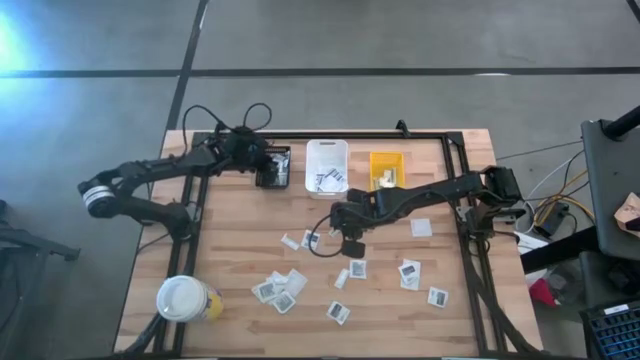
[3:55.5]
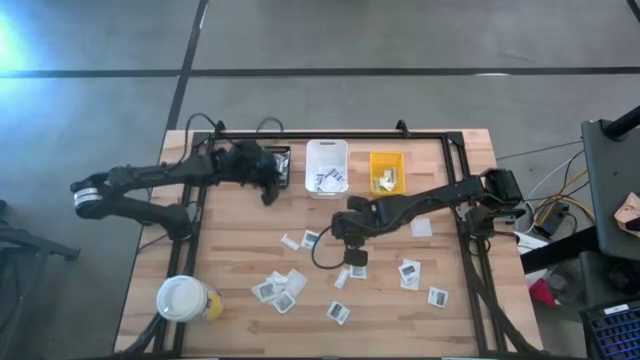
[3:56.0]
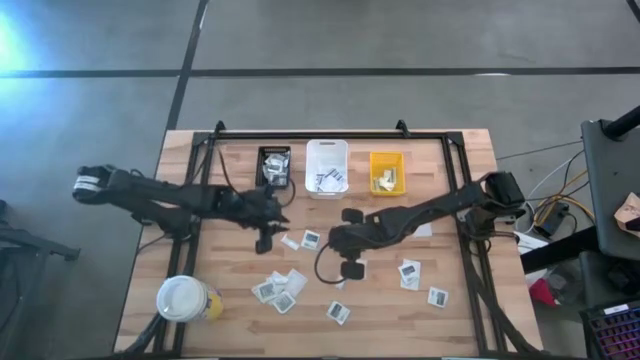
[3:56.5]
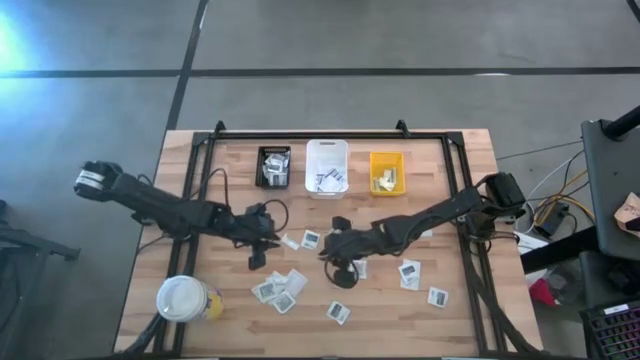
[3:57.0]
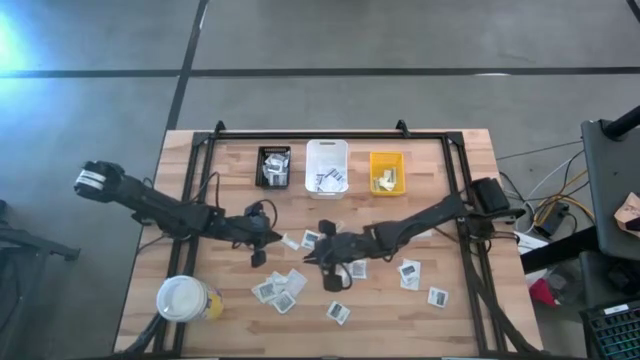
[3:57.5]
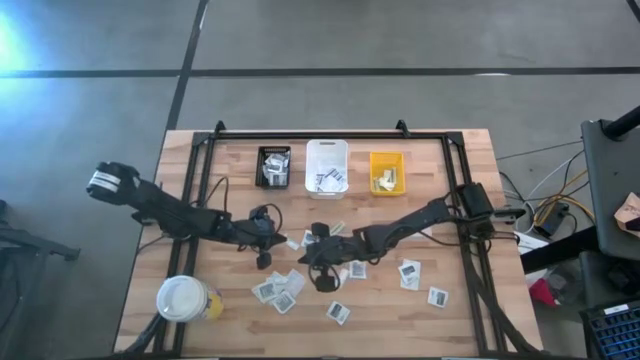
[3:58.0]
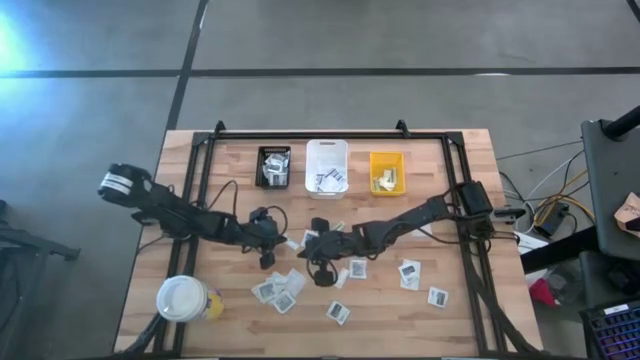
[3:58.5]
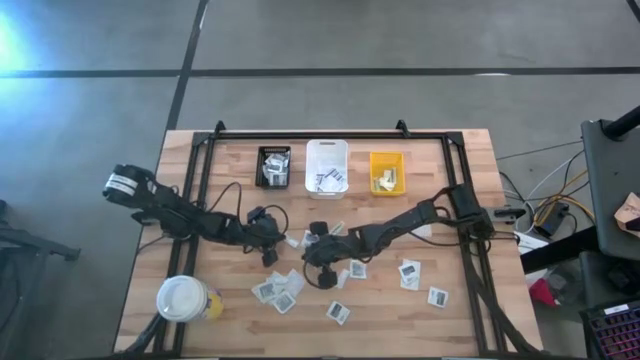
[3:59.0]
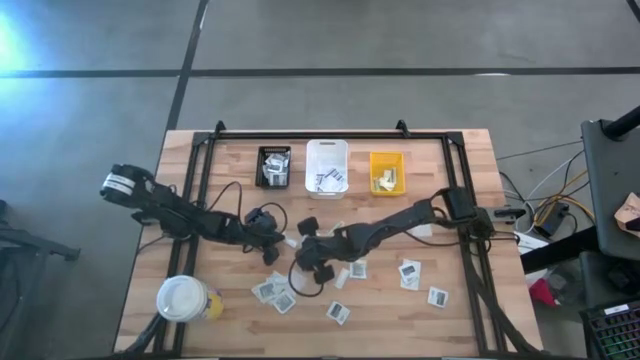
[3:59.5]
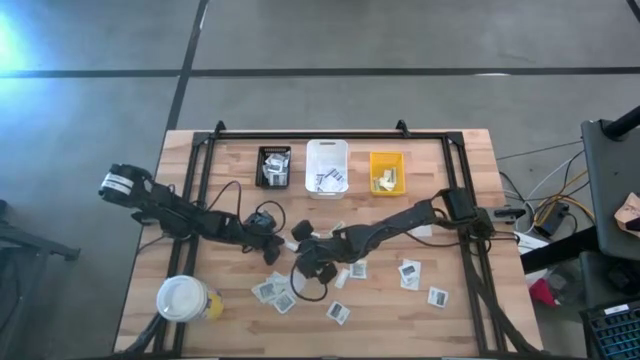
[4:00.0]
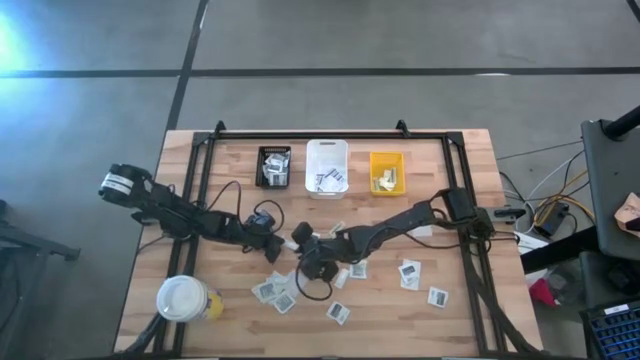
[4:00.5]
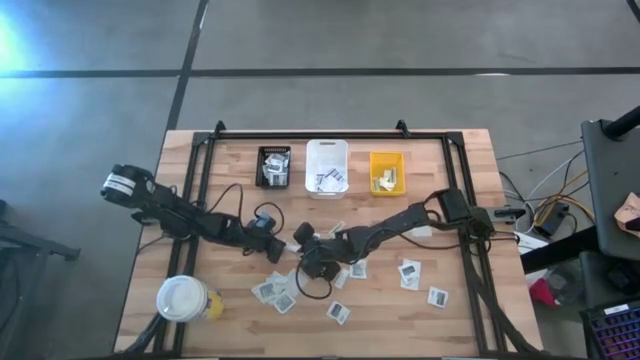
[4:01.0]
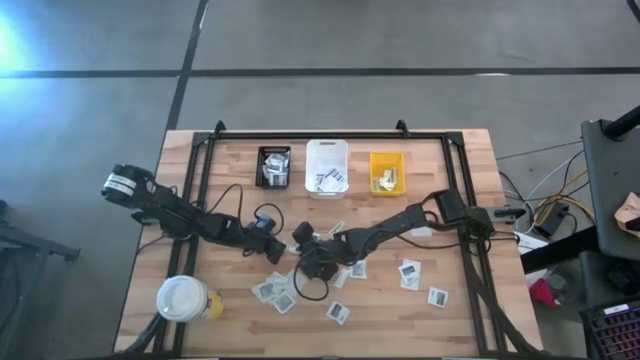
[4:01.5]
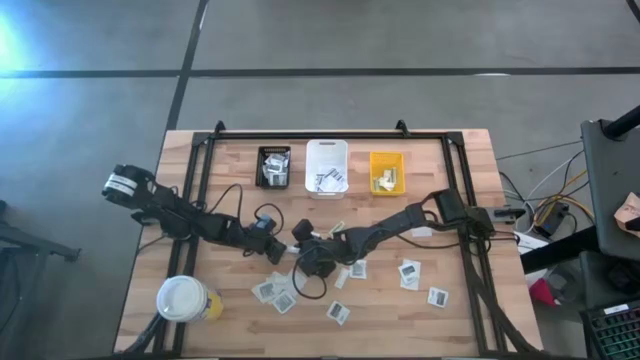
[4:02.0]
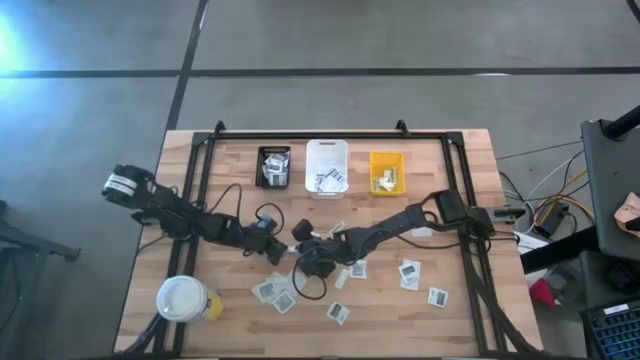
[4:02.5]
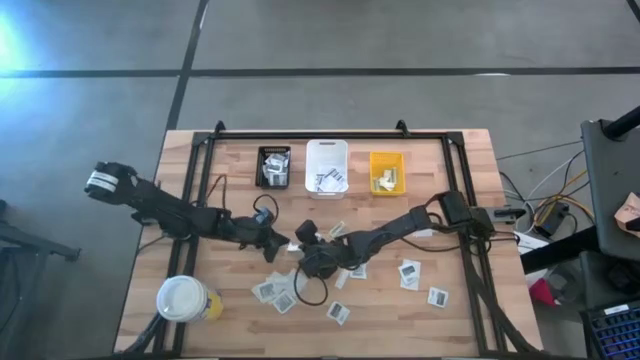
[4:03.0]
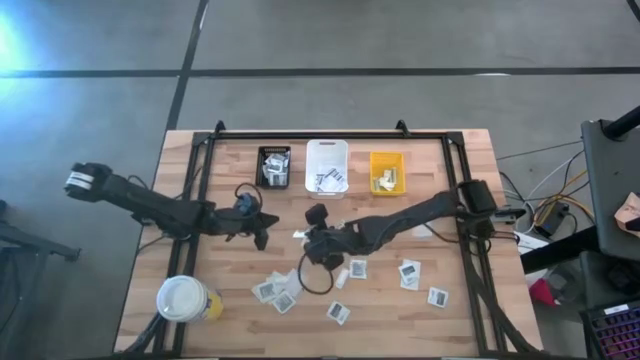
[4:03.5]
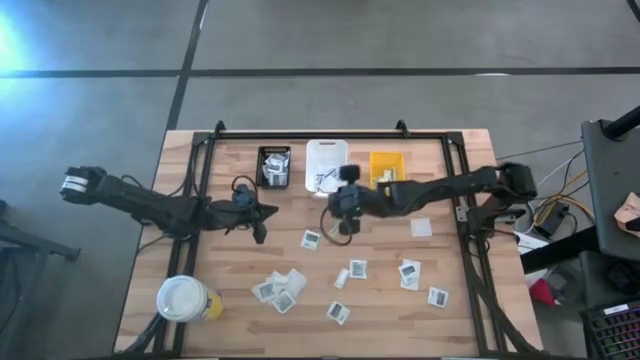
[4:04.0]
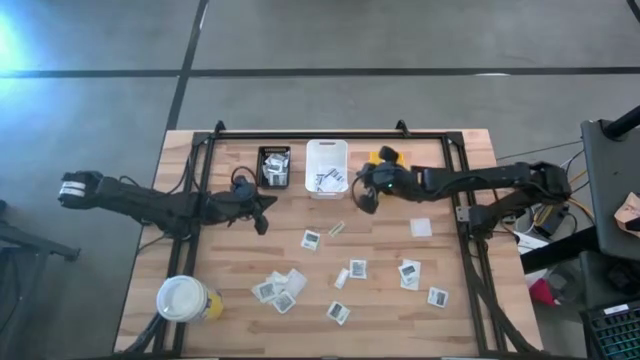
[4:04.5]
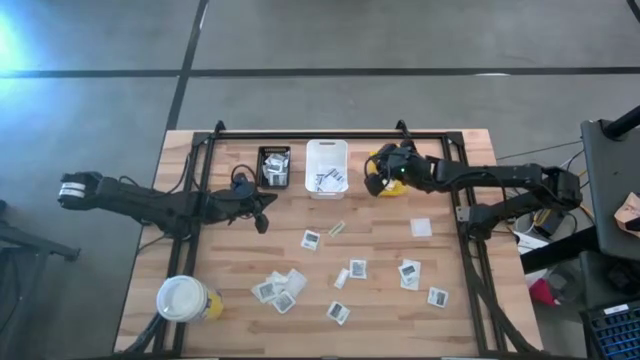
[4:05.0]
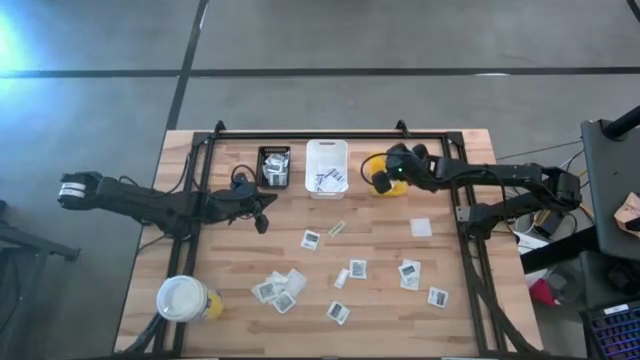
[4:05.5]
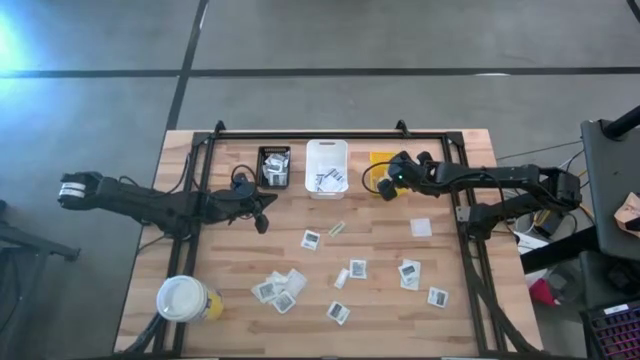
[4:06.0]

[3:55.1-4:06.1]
Task: Pick & Place First Aid Supplies
Put the green bandage into the yellow basket

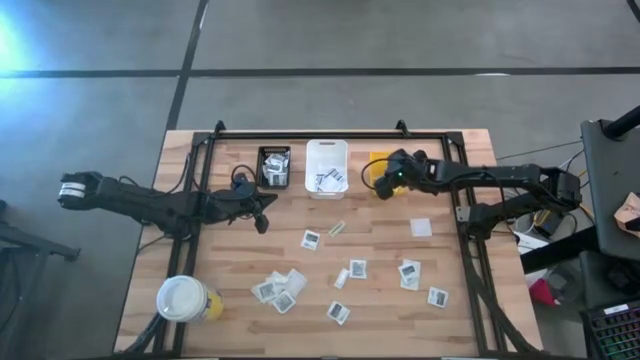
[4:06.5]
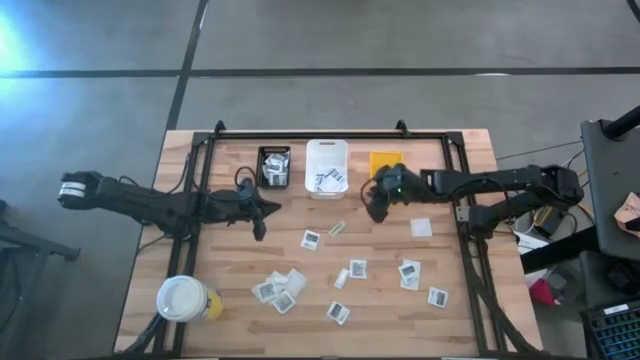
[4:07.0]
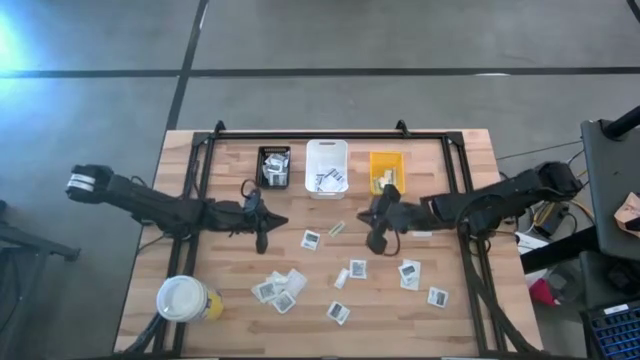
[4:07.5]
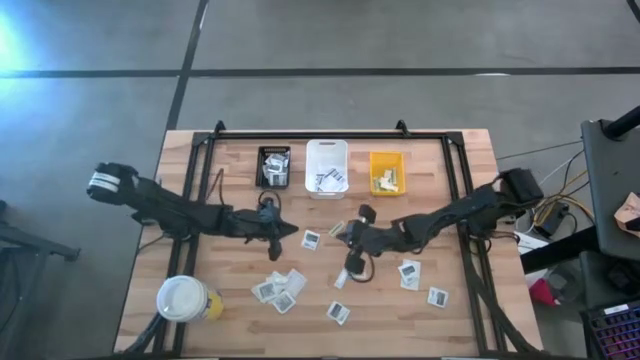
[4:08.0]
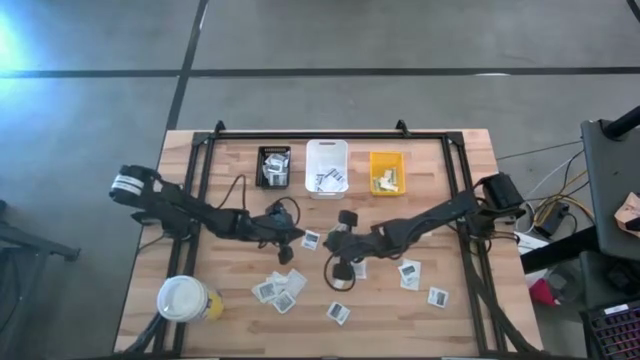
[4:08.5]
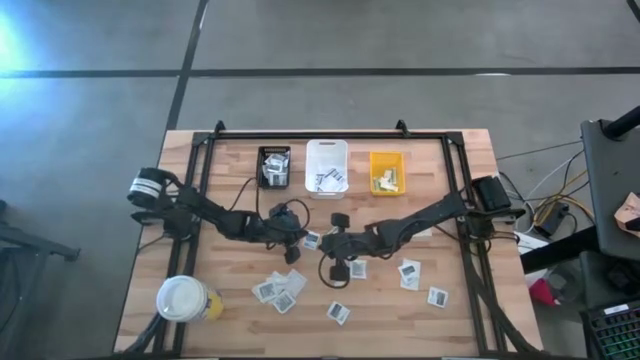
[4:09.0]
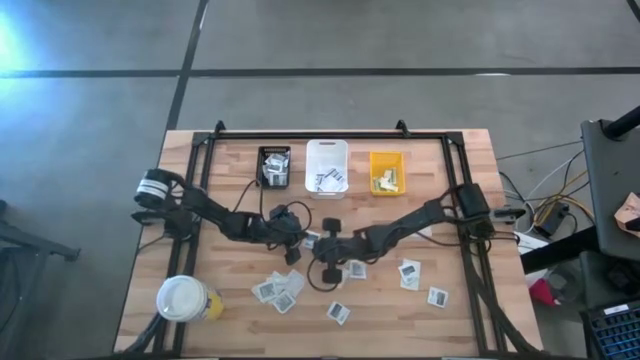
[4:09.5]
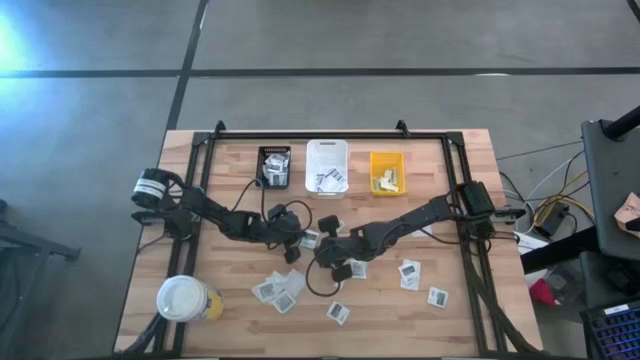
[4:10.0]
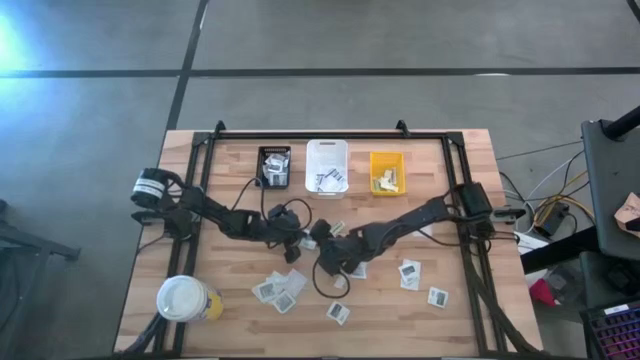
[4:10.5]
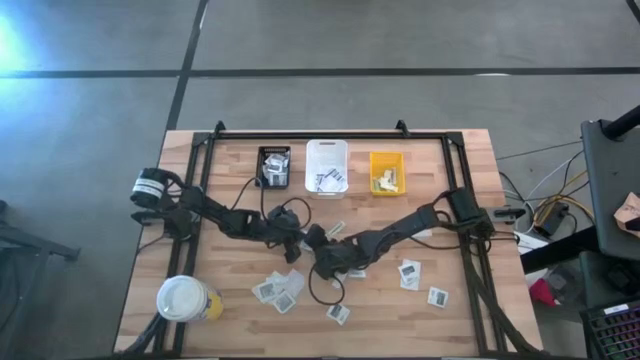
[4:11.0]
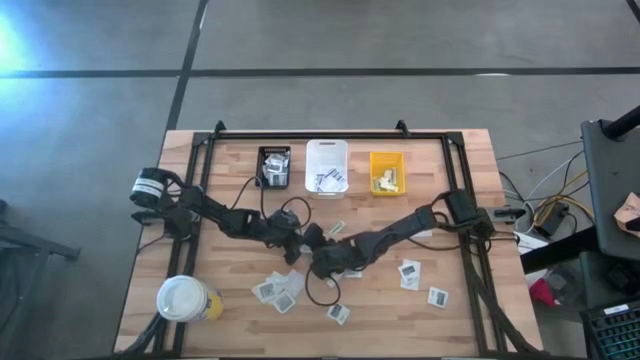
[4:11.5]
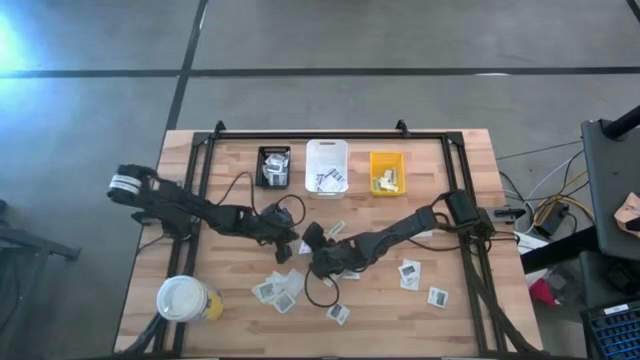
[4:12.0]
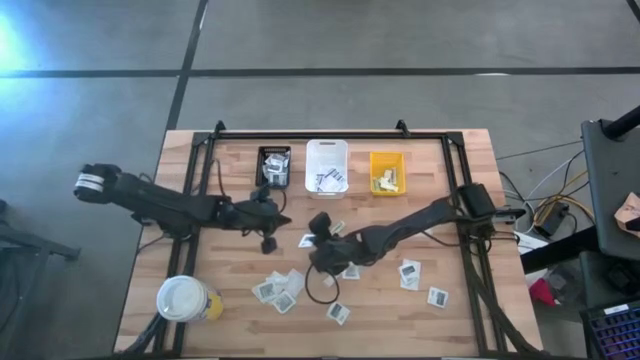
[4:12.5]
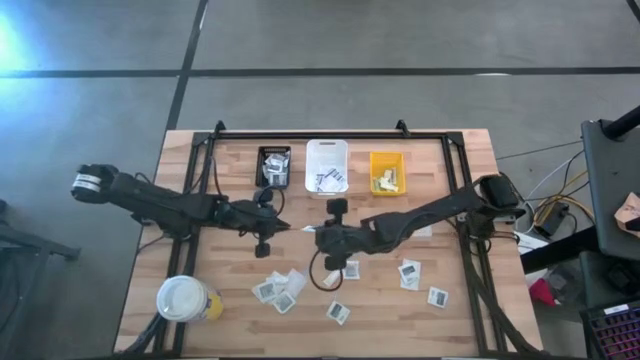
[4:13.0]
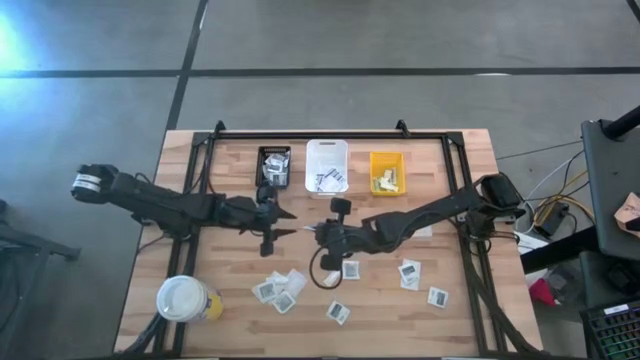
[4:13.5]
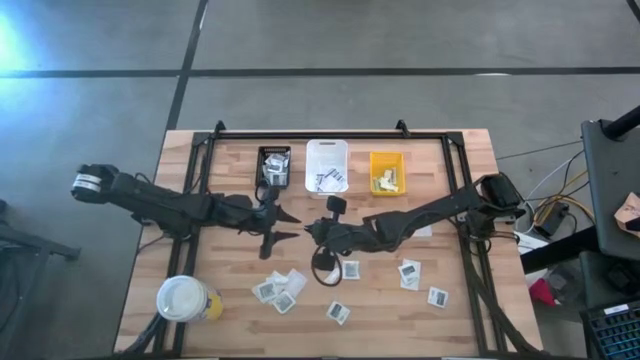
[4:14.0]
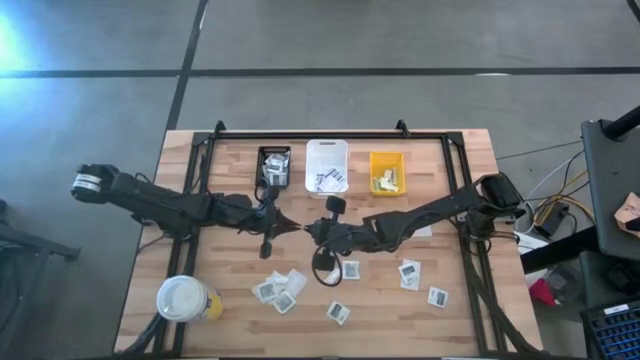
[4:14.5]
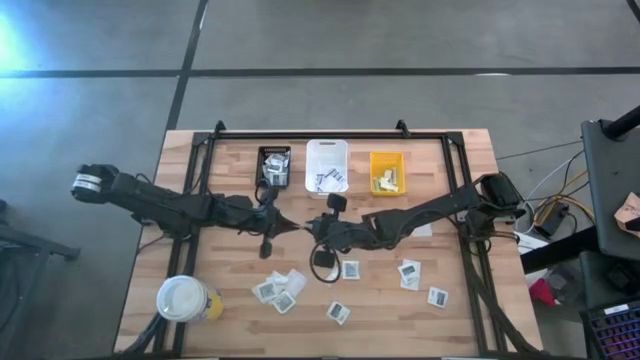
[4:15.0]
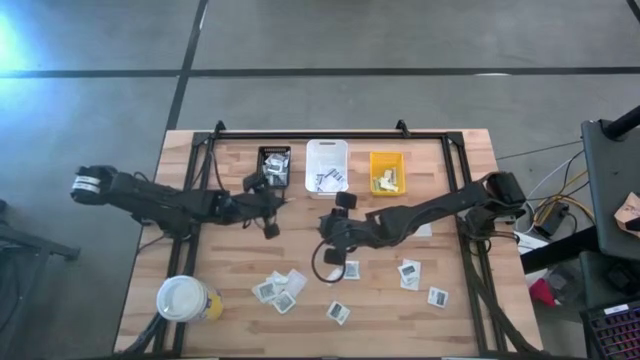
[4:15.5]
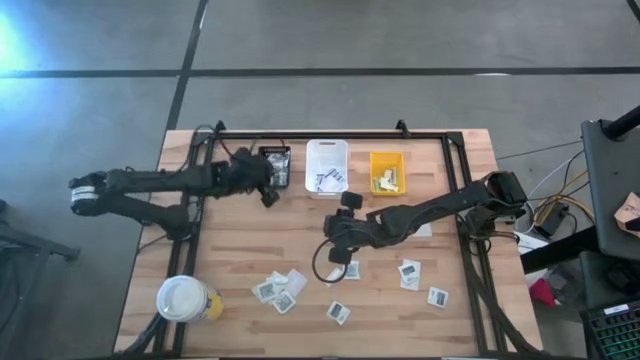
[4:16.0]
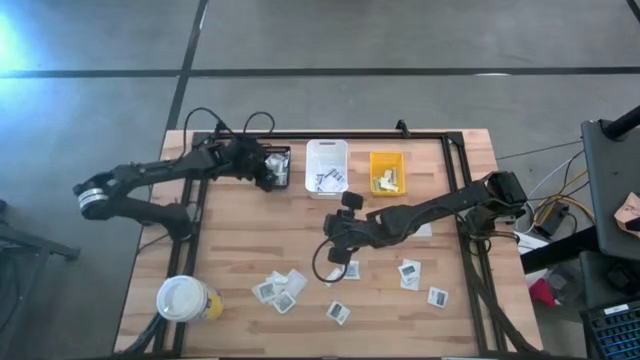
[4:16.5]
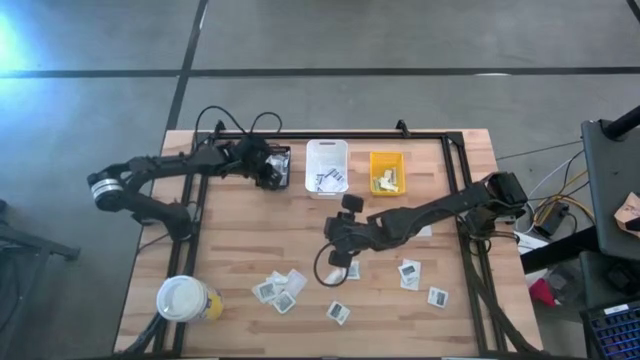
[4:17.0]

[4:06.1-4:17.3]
Put the towelette pack into the black basket
